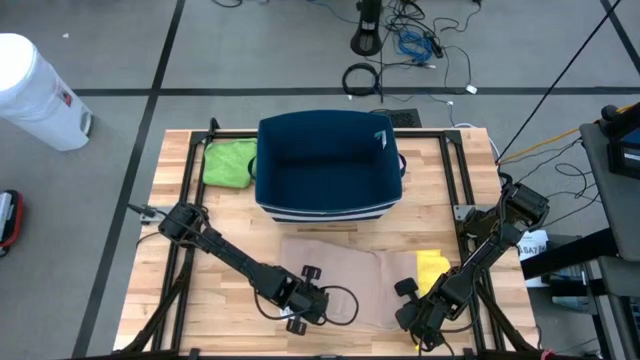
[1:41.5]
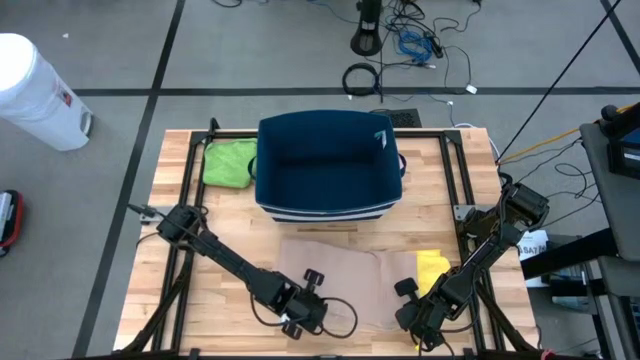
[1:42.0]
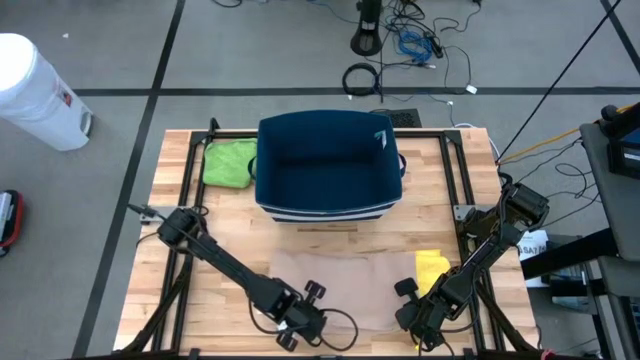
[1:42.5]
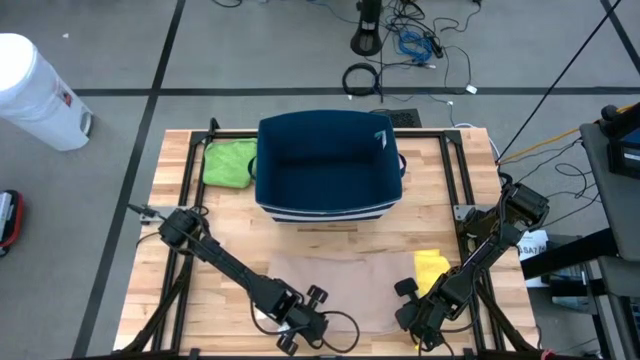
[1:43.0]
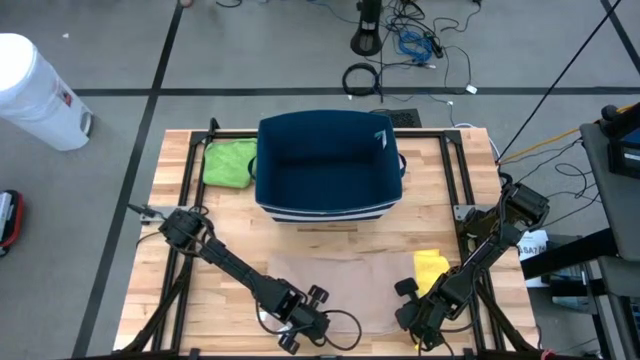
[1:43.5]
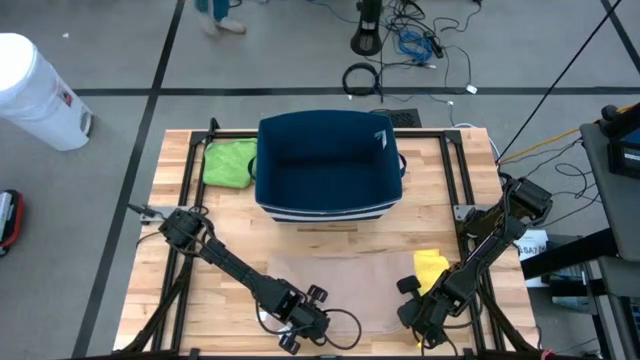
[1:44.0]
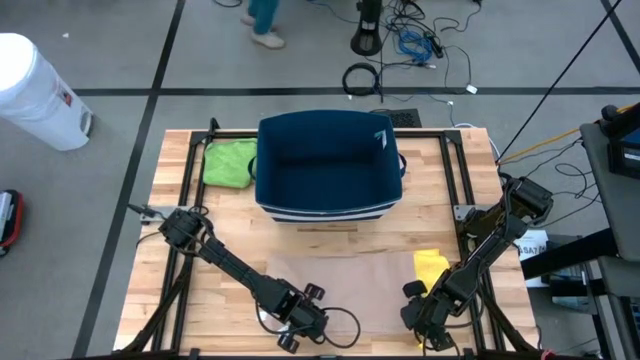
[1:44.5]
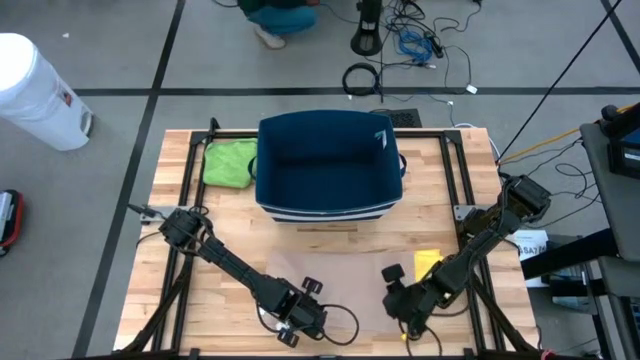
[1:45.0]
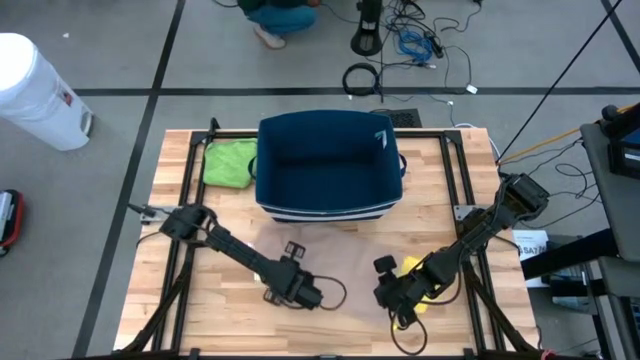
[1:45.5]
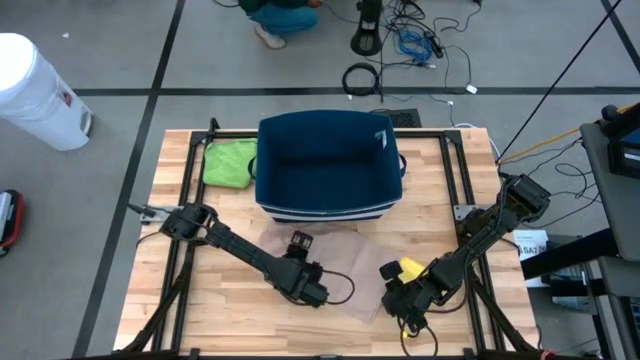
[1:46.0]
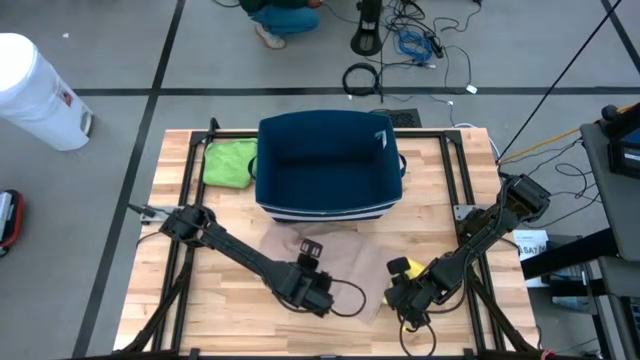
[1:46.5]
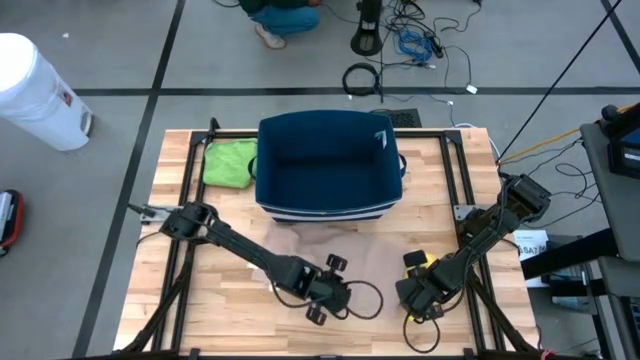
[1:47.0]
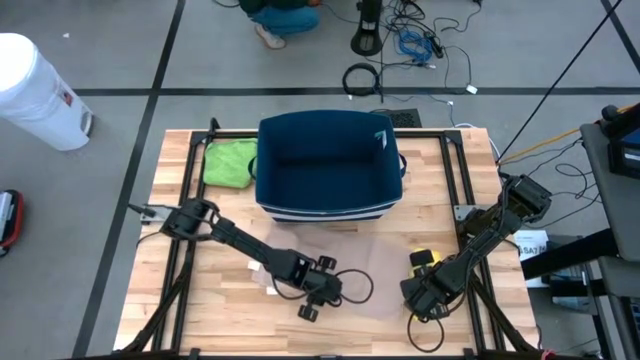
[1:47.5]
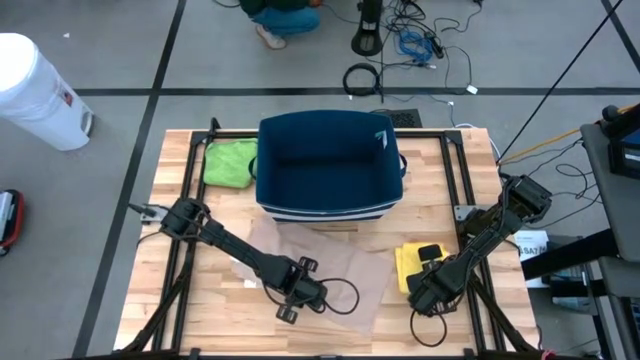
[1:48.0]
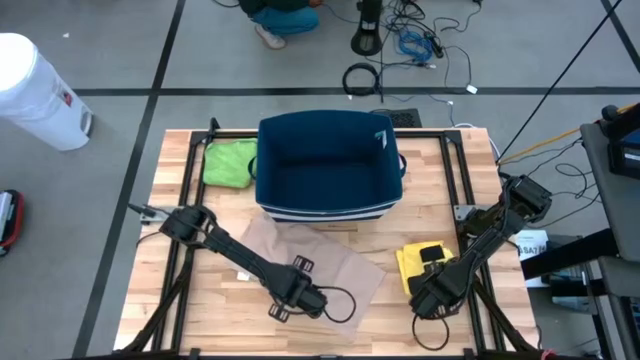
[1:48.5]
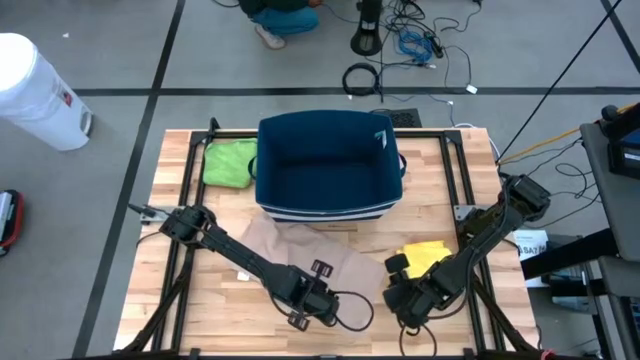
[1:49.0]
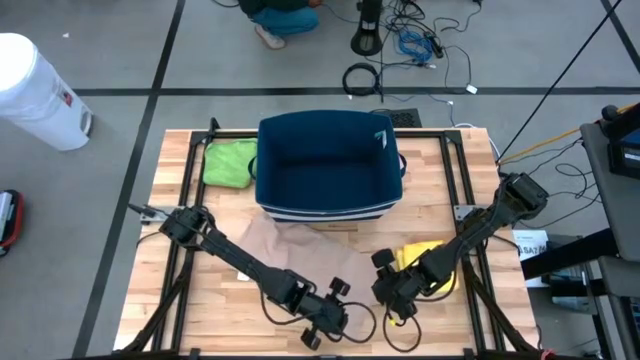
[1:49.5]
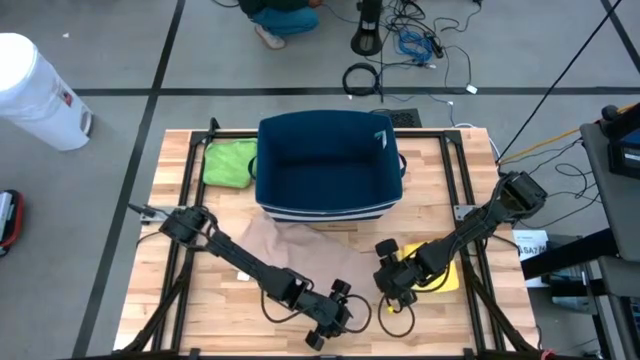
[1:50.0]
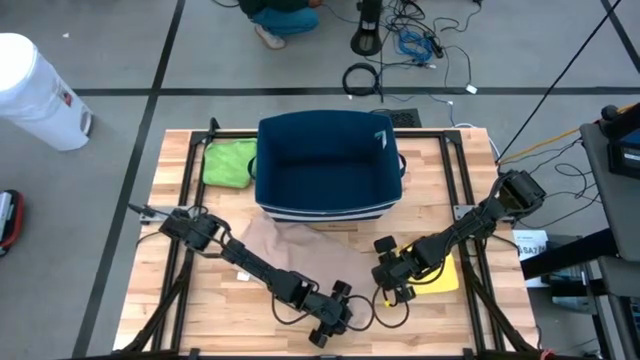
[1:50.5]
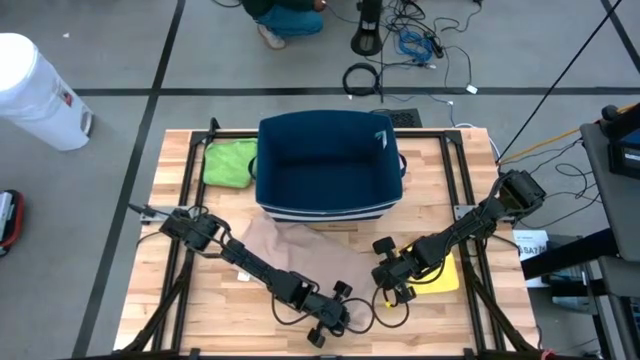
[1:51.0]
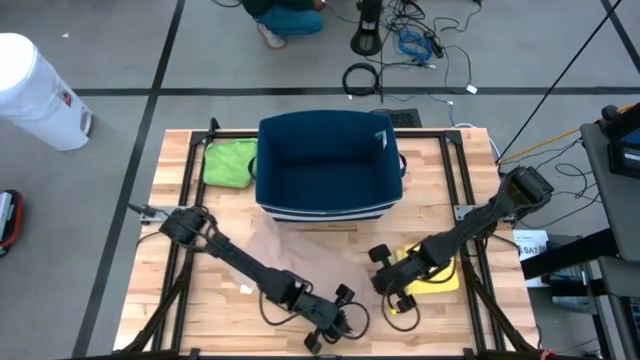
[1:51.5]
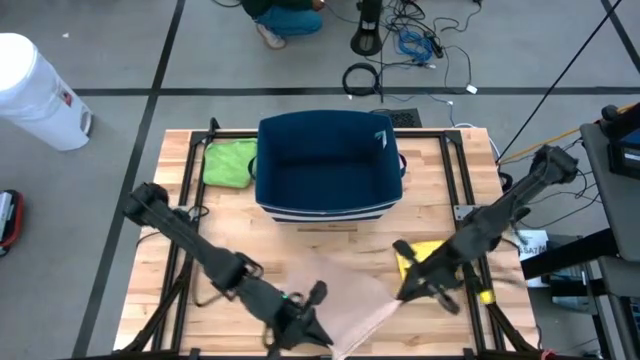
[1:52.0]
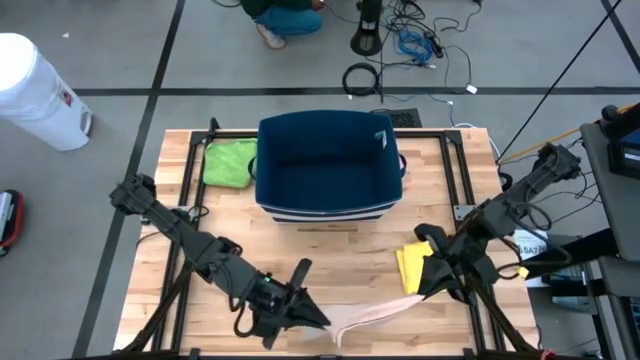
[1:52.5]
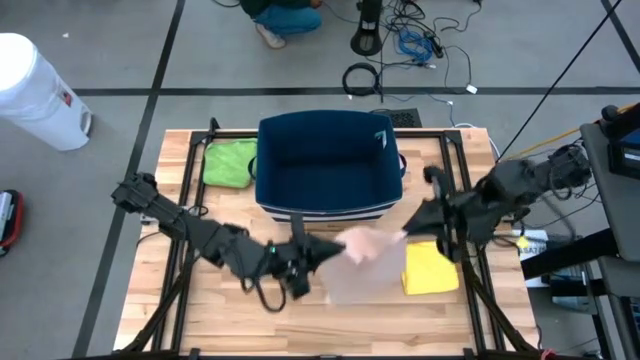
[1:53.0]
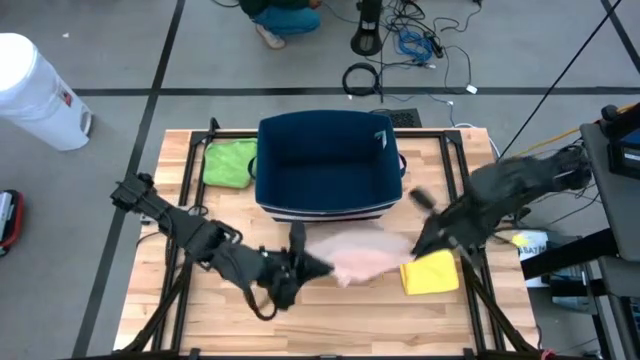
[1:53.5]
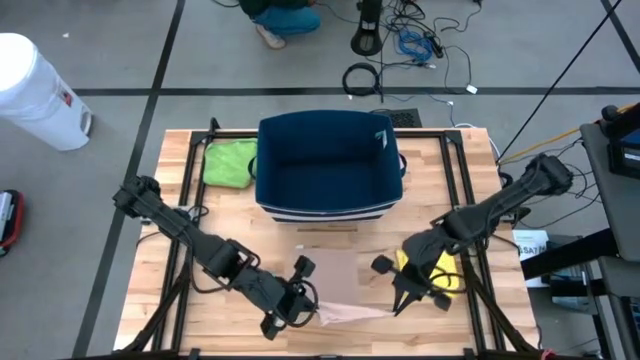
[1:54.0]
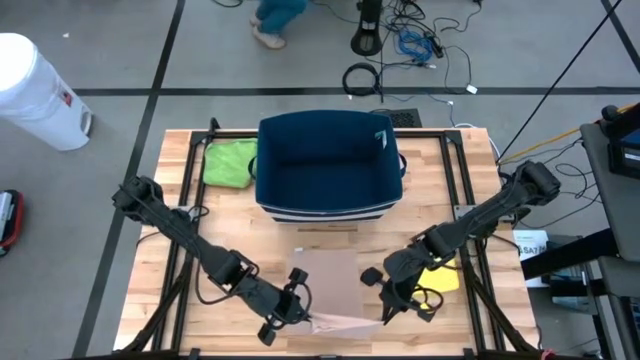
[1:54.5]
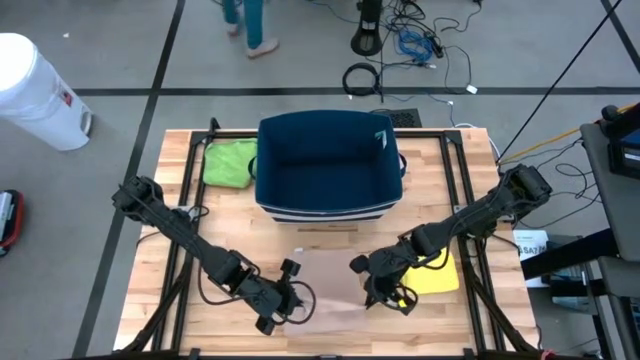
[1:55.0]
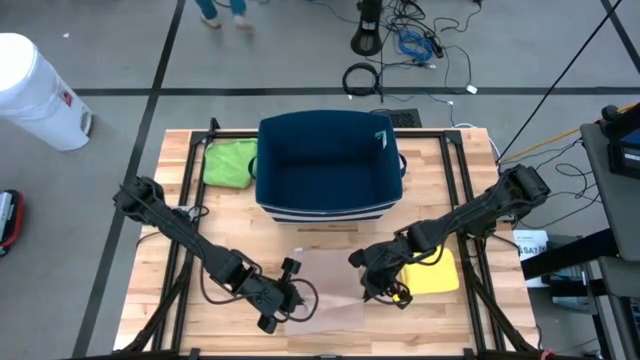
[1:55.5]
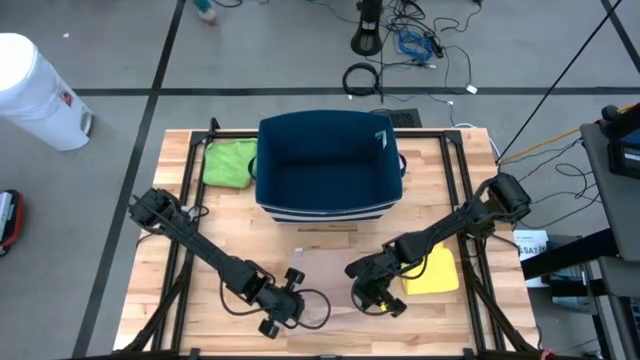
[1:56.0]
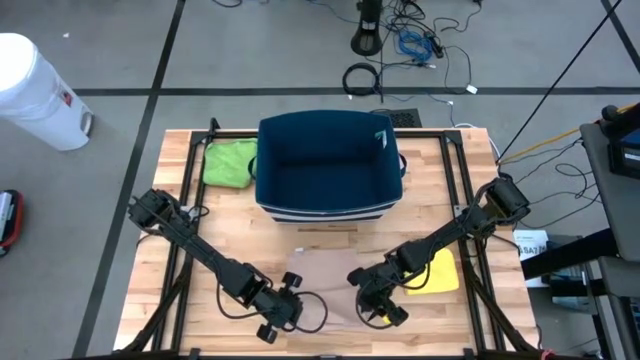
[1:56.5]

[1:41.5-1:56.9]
Task: Fold towel
Fold the light brown towel

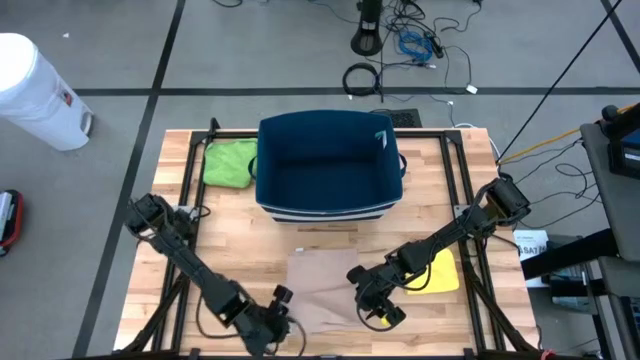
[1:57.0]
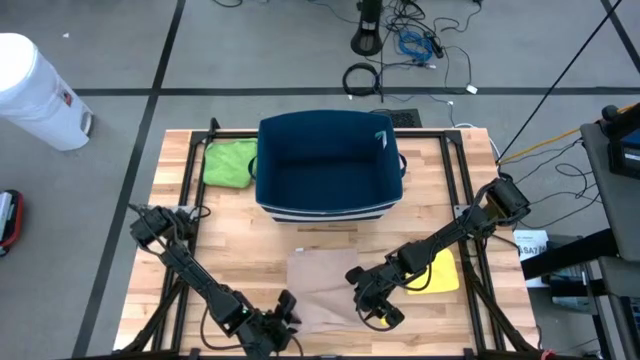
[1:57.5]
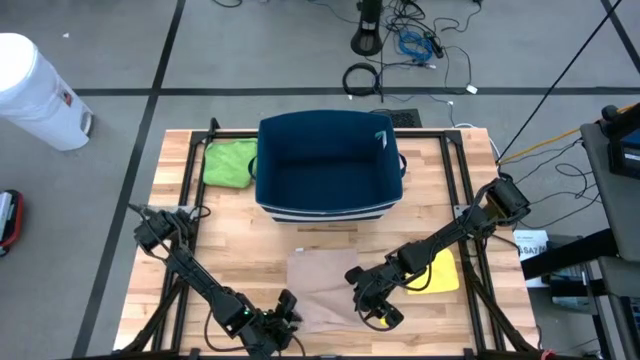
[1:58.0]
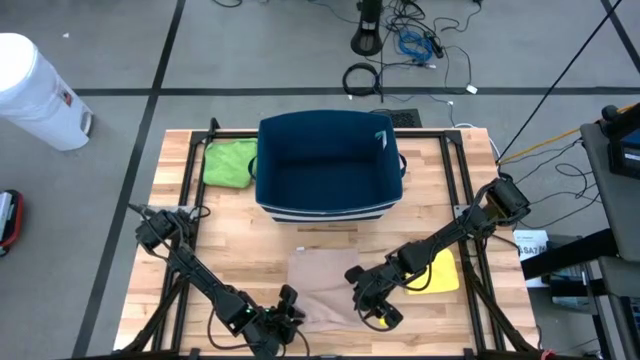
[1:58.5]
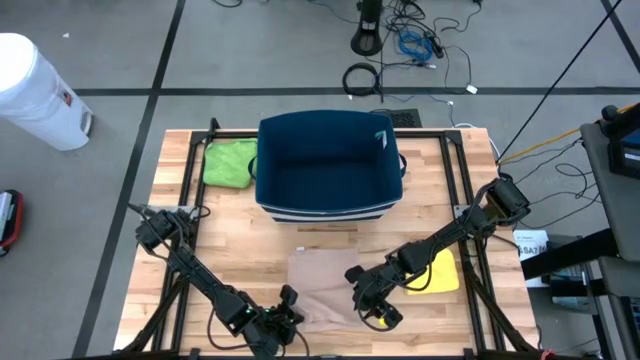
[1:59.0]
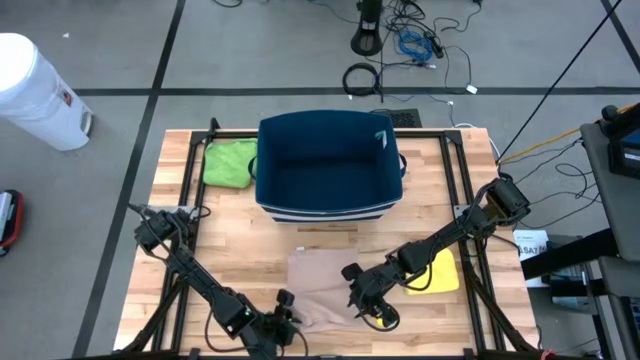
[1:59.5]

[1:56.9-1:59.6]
Fold the light brown towel

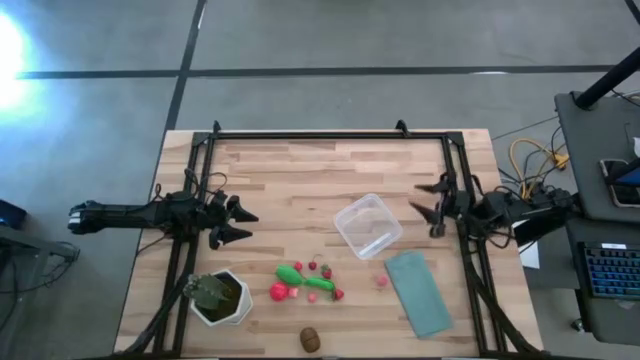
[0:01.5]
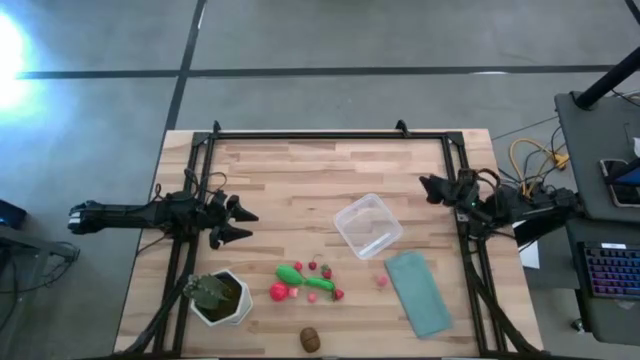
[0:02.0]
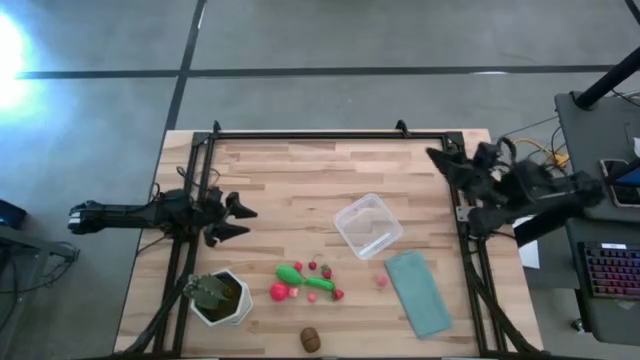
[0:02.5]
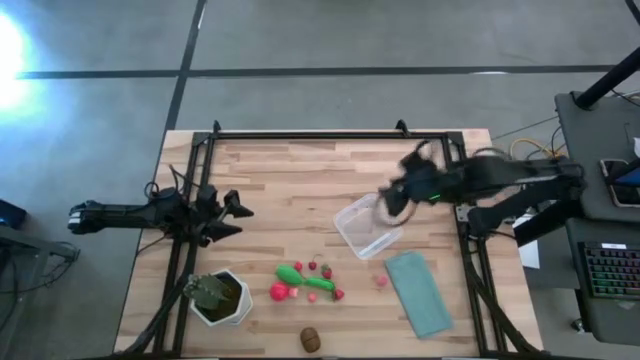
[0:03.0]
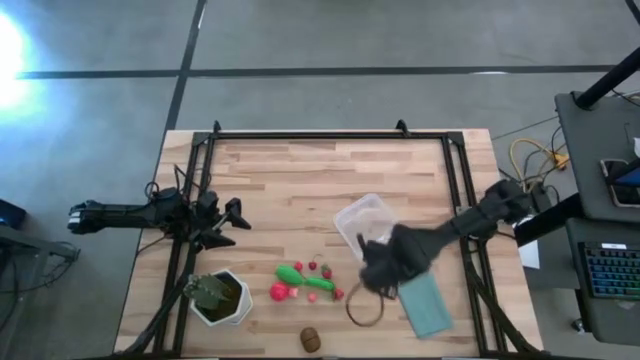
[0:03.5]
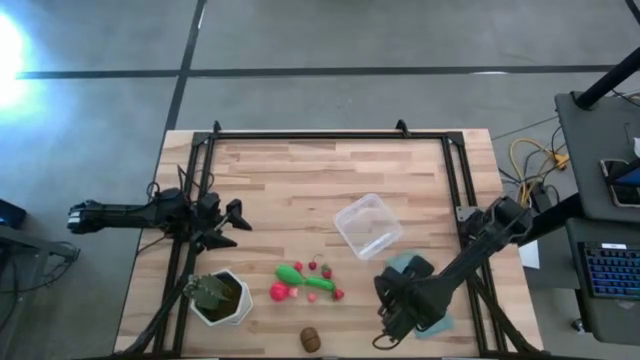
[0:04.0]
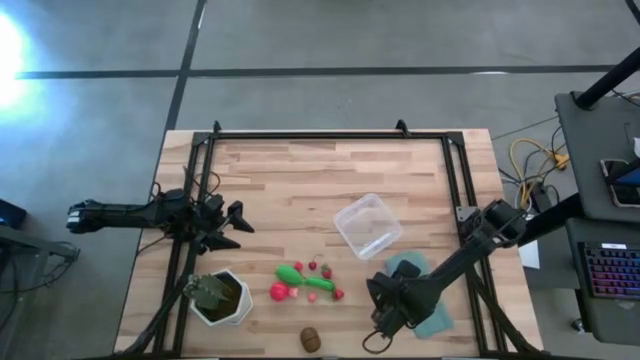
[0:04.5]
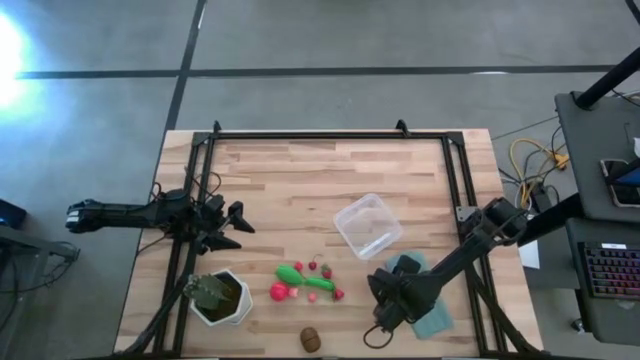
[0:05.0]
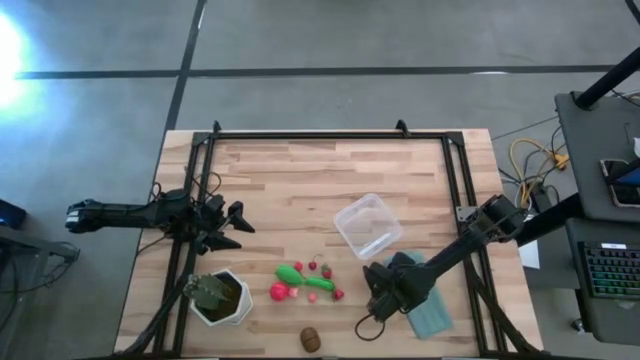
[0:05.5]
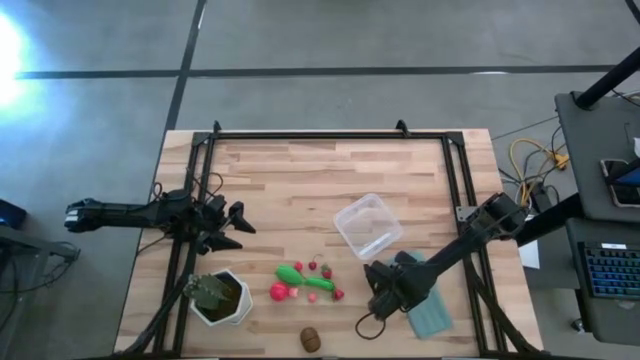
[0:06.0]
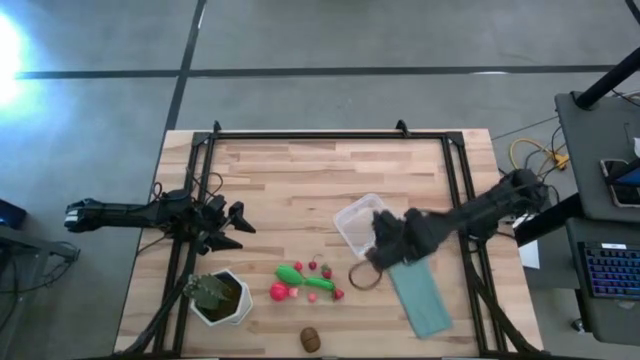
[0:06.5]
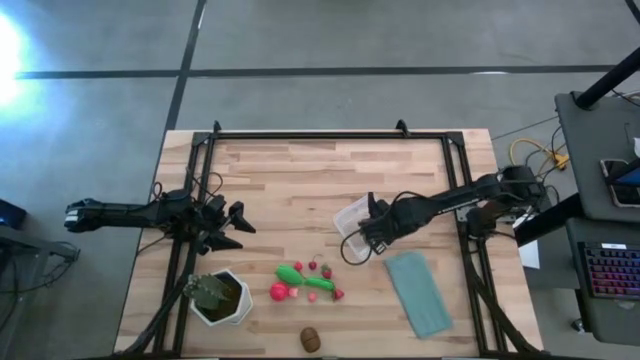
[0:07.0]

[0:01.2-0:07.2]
Task: Pick and placing Produce into tupperware
Put the right pink peach into the transparent bin
